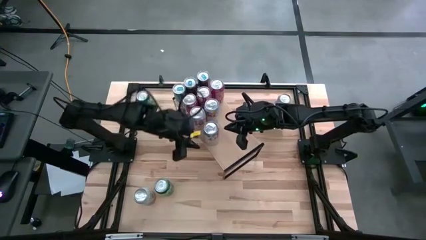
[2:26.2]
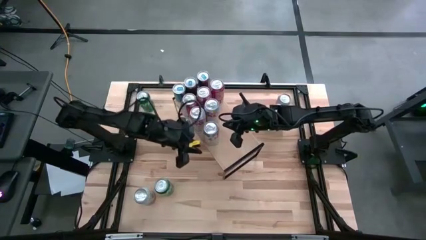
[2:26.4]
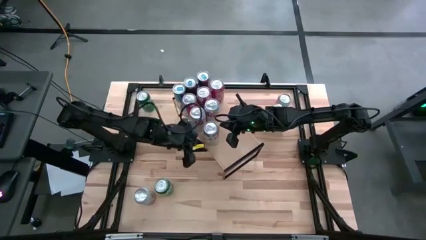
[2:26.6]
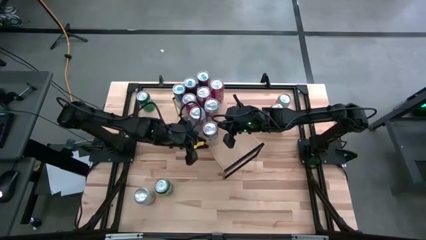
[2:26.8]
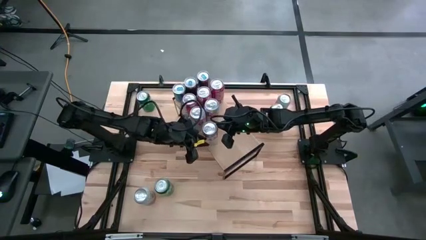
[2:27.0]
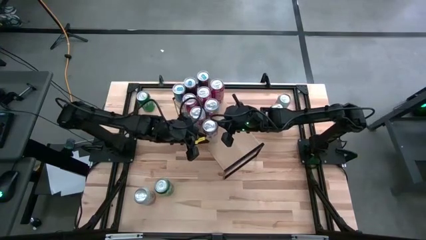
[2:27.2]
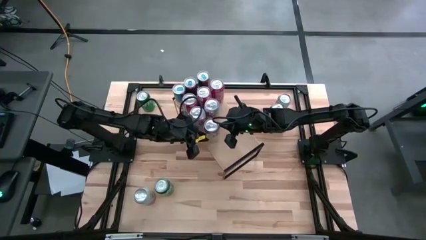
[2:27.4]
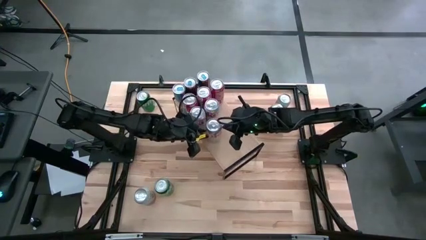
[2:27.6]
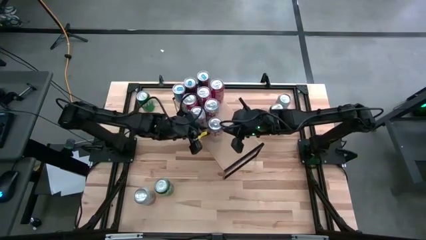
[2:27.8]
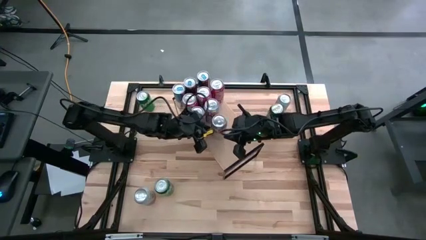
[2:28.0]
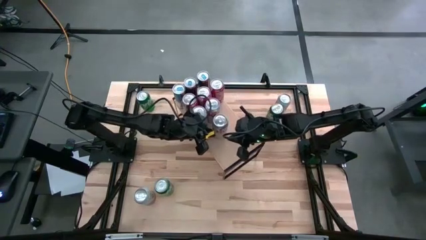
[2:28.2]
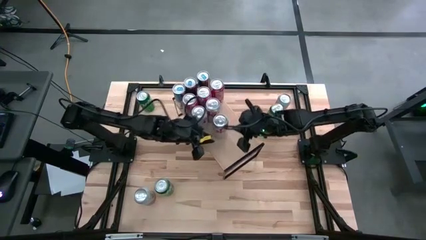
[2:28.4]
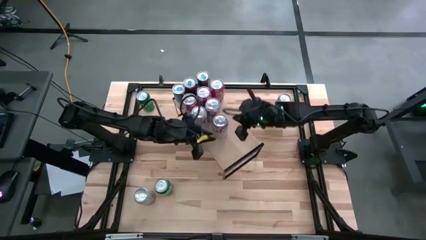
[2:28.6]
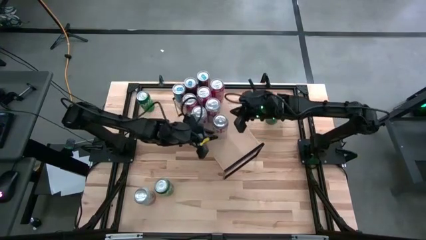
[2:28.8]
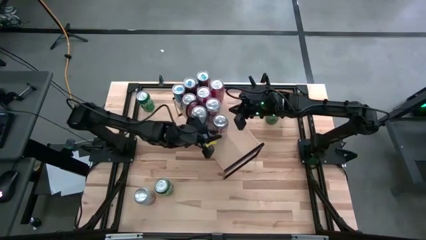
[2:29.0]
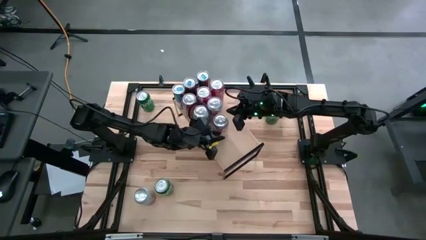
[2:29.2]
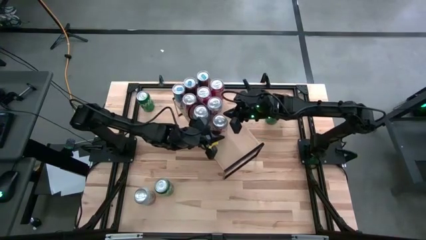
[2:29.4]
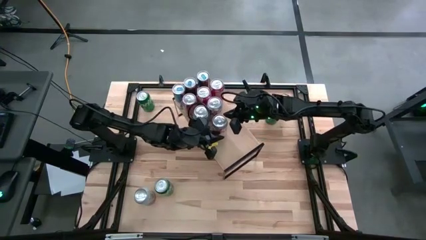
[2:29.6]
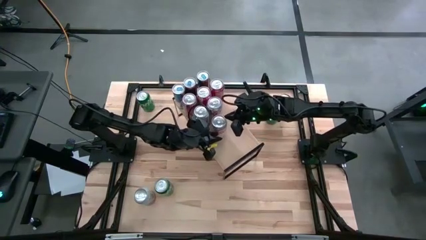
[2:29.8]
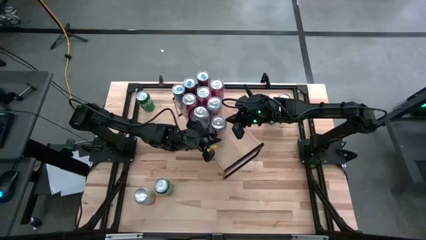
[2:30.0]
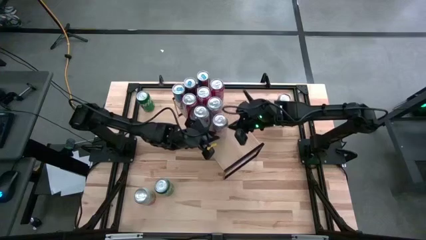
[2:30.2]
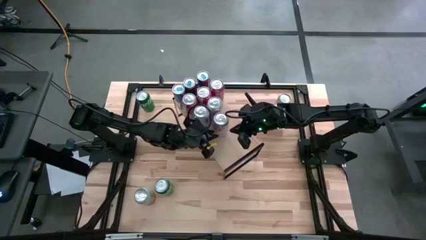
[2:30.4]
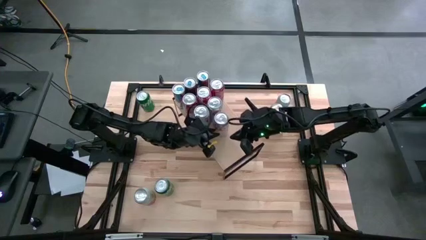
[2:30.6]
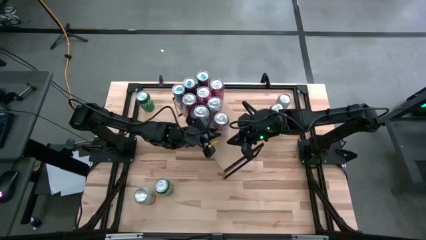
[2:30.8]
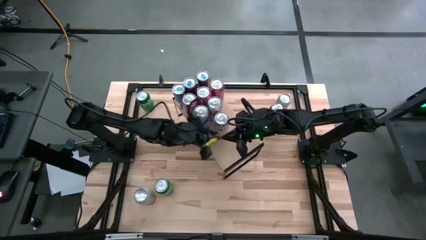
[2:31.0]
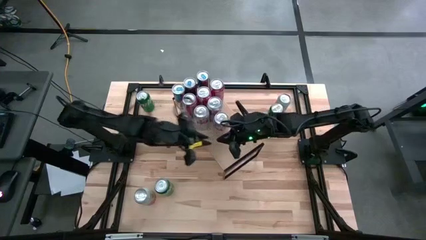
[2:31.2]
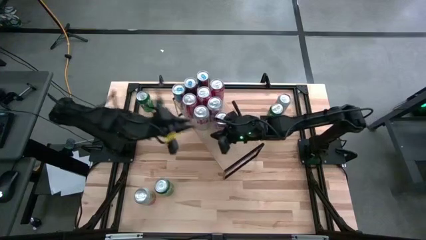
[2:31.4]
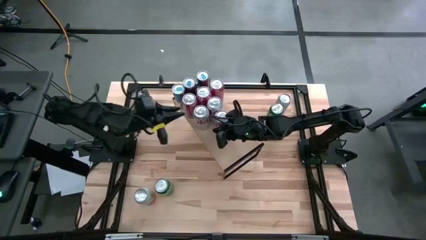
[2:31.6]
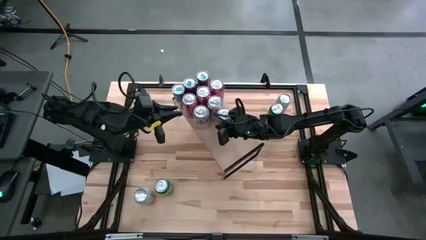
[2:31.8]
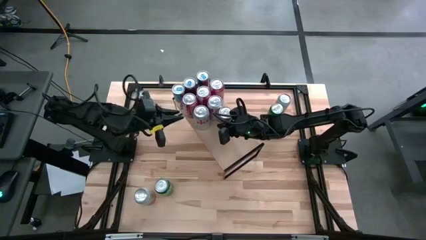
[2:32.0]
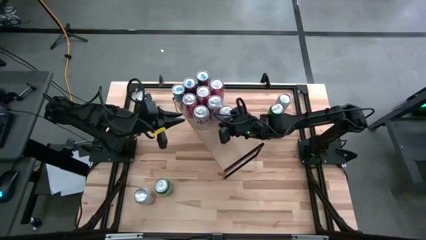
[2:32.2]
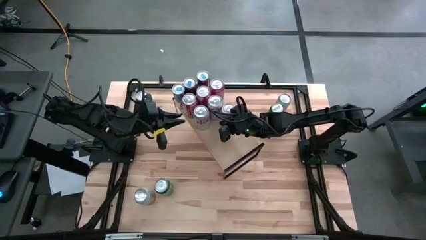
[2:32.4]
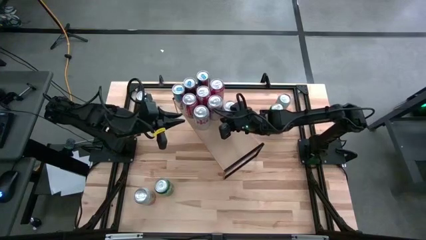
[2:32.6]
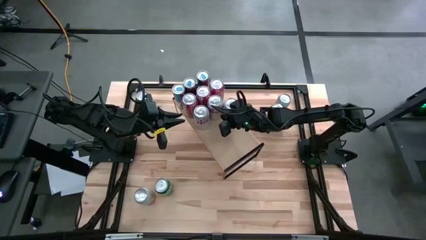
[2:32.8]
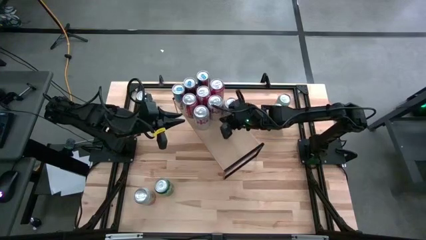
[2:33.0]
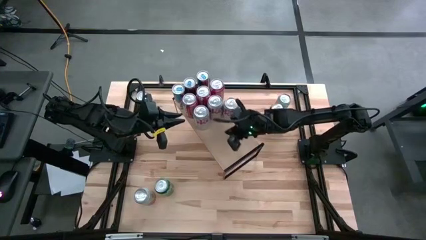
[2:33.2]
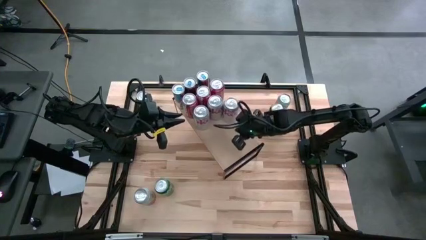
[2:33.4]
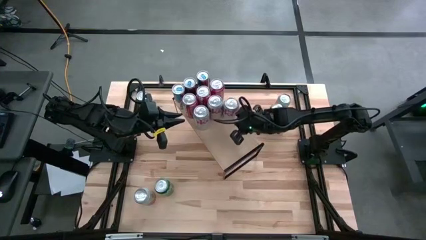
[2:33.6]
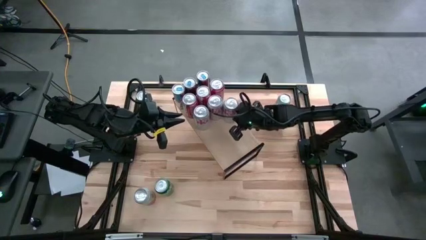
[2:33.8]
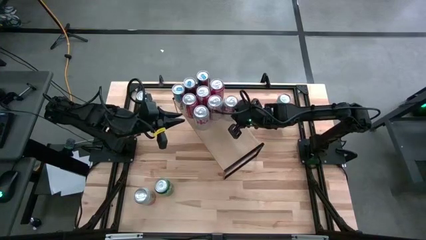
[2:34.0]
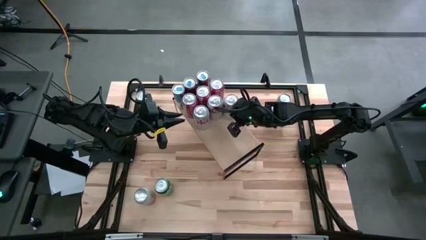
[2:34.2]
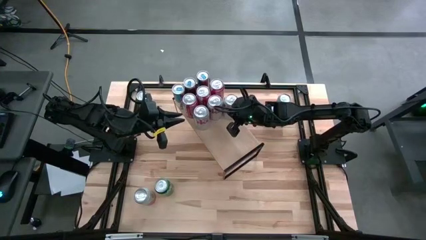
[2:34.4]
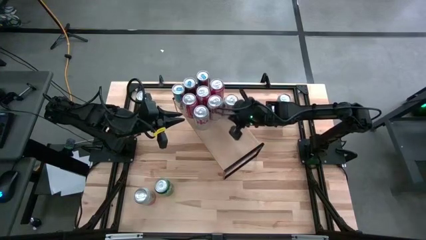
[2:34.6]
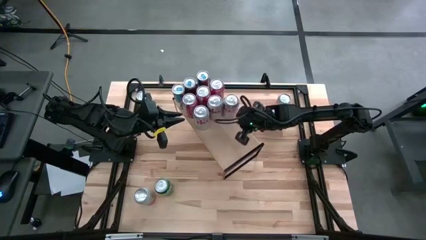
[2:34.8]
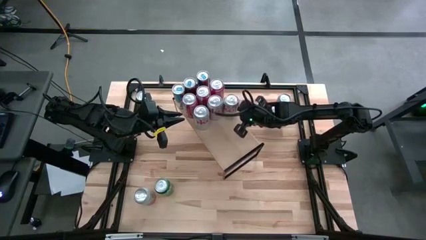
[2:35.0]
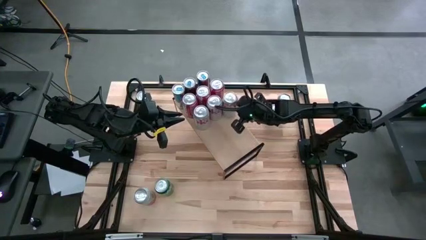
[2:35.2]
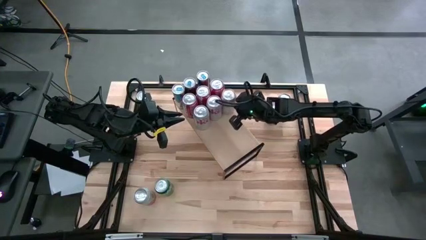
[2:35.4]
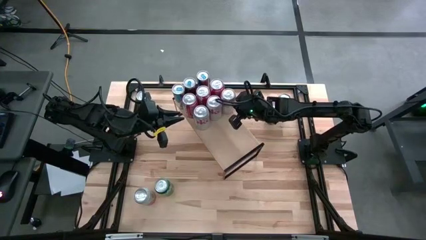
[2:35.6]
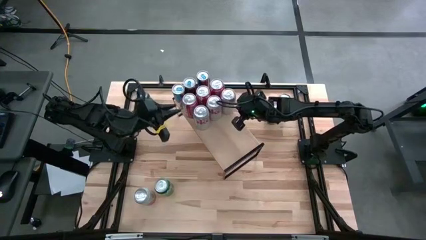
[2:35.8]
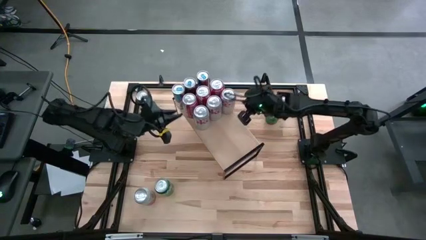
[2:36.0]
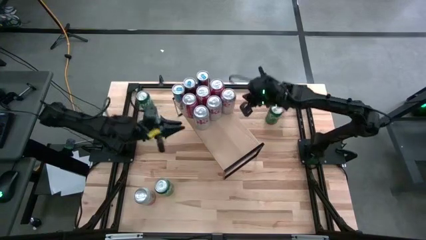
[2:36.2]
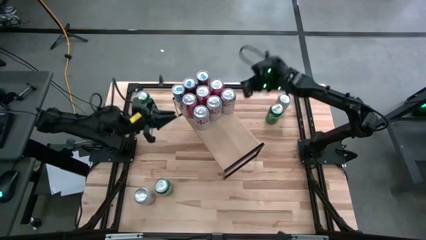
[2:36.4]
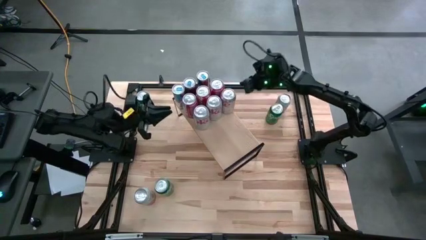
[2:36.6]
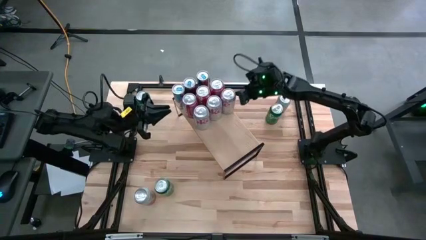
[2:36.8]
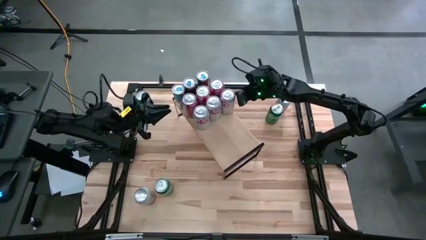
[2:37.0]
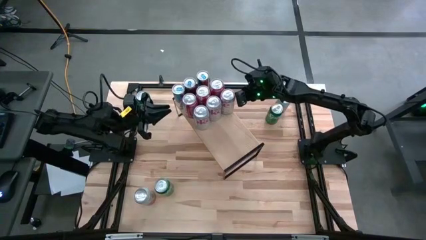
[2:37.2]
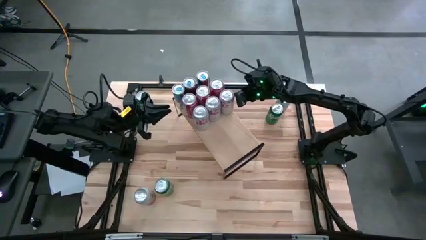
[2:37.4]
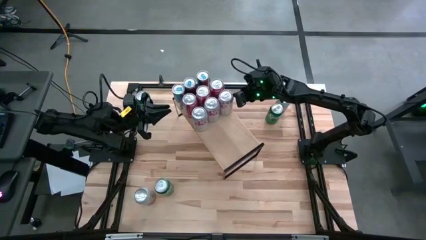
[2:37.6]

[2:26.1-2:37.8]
Task: Place canned beverage on shelf
Put the silver soda can on the shelf aligned with the other silver soda cans

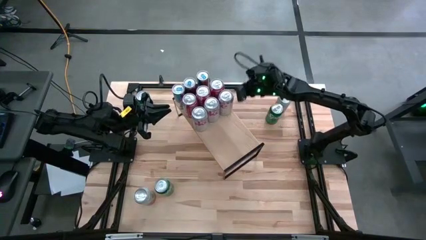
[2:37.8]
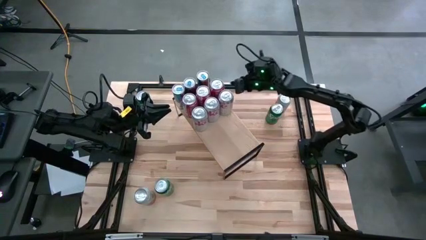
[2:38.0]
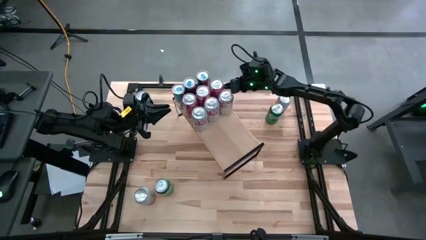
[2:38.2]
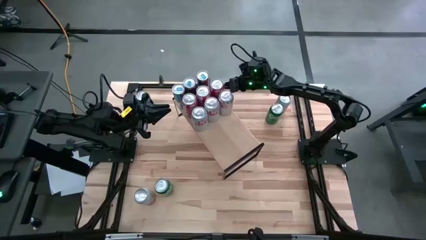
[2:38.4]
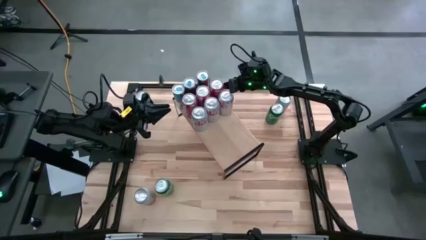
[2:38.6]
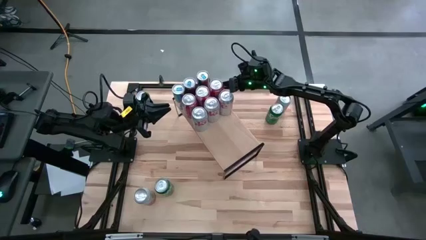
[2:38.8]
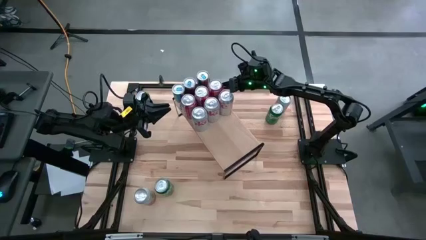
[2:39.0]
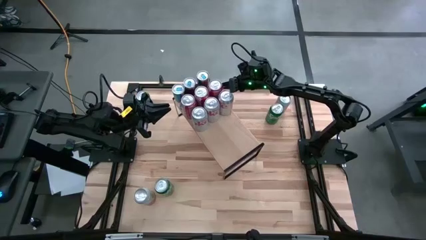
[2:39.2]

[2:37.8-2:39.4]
Adjust the red soda can on the shelf
